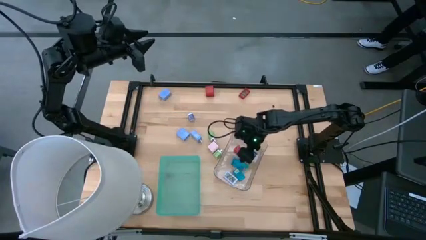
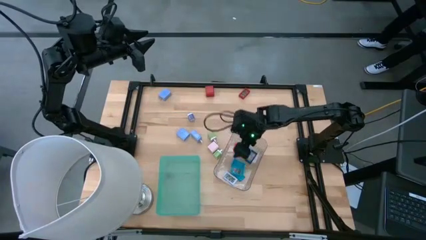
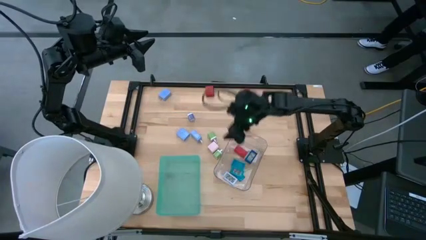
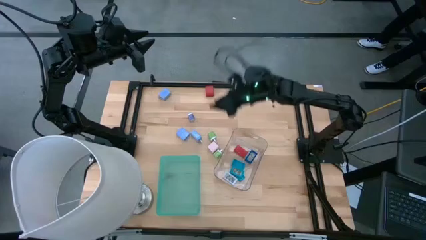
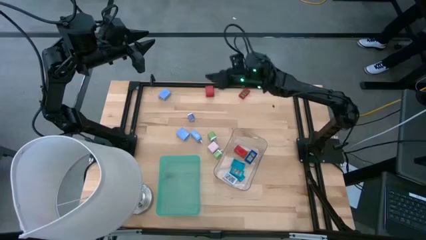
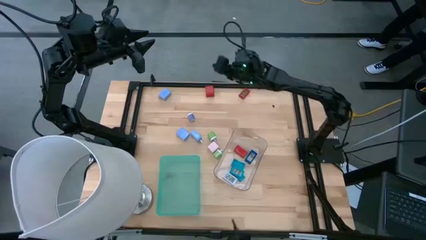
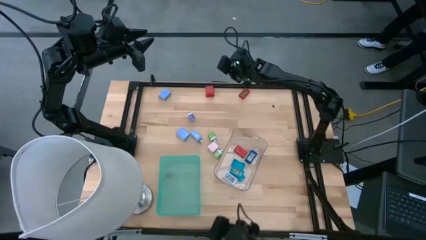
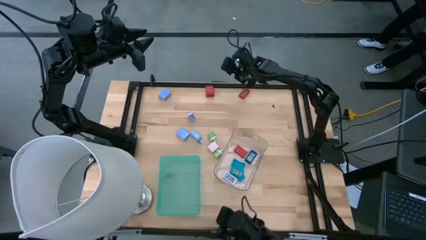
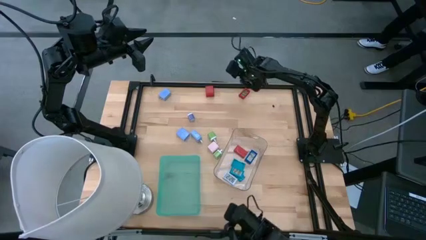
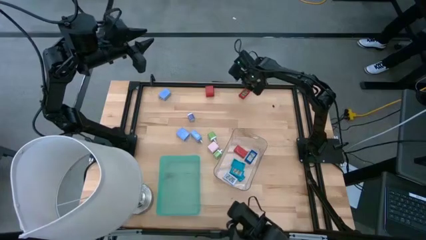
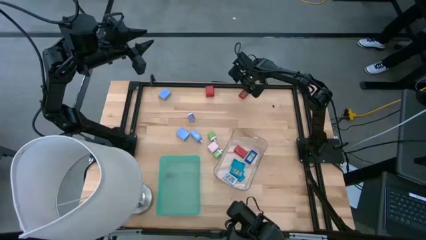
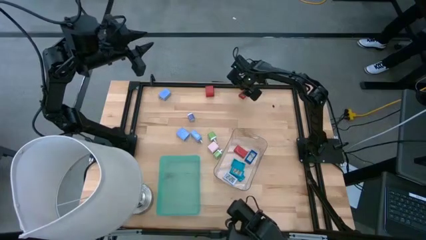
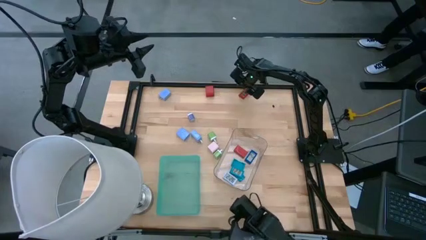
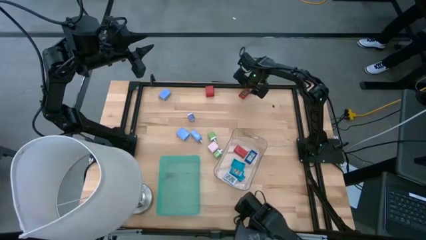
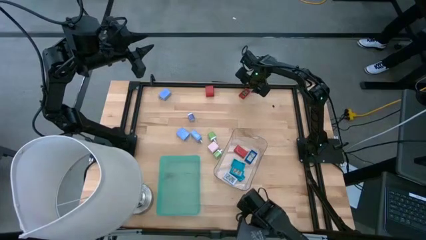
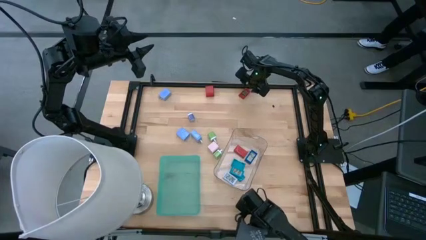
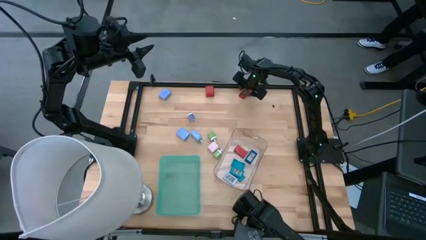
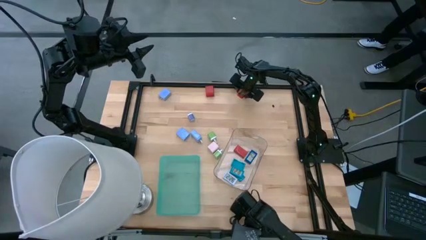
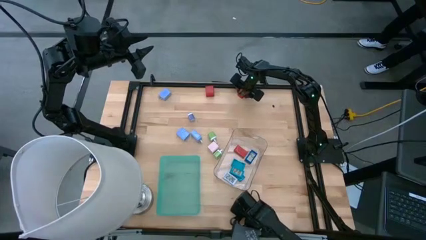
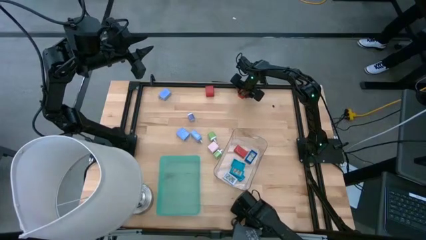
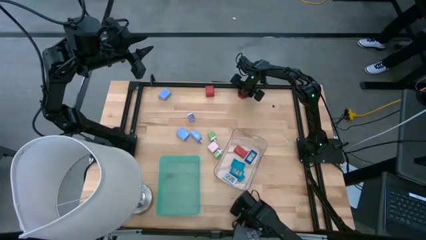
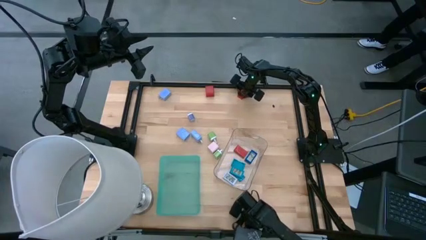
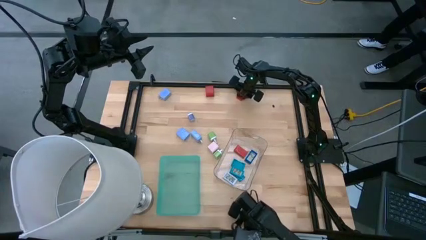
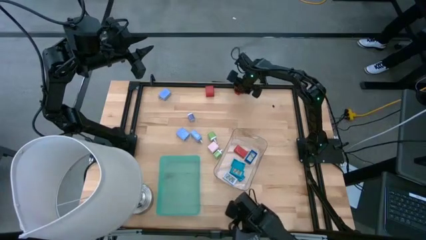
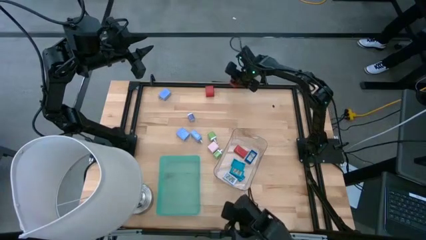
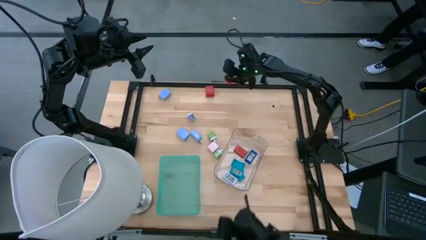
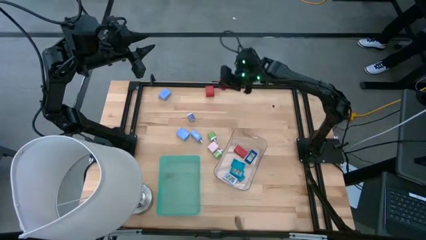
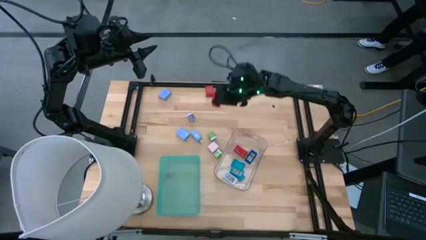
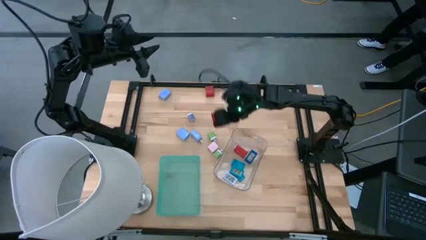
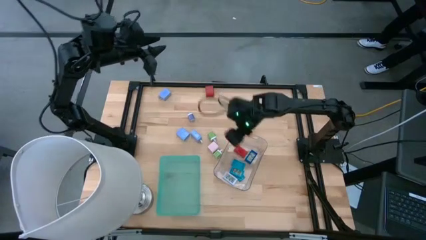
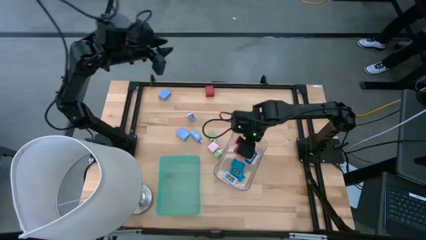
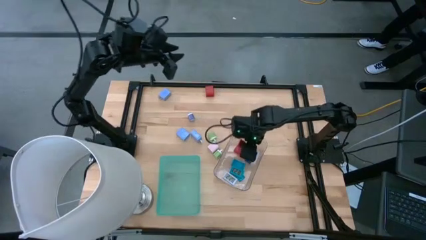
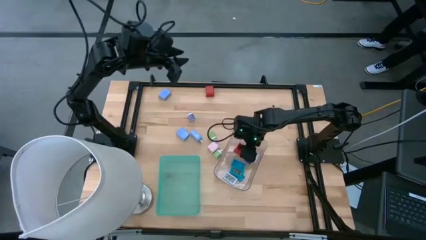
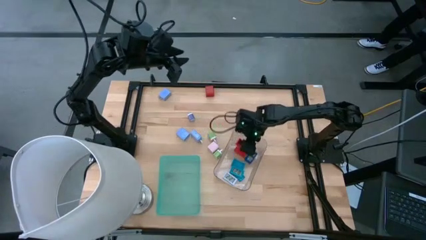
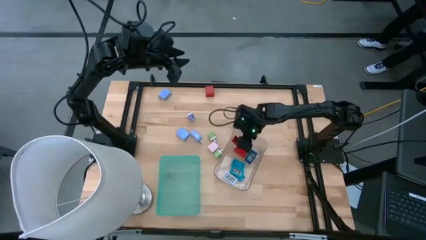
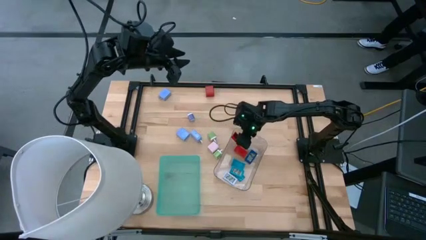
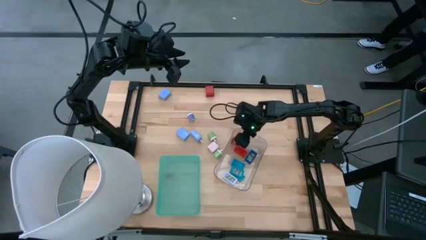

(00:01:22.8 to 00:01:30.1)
Task: Pick & Place Office items
Put the red digital clock into the transparent bin

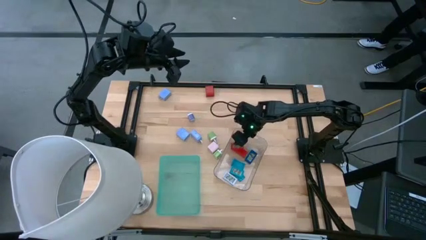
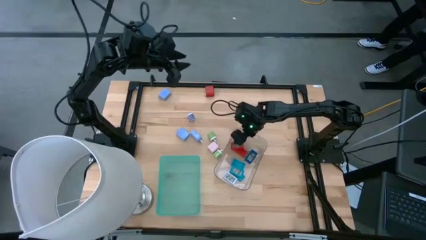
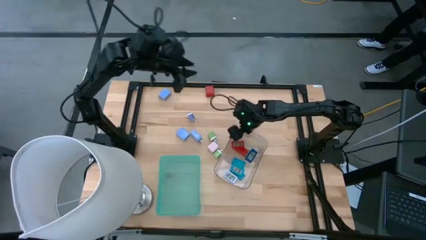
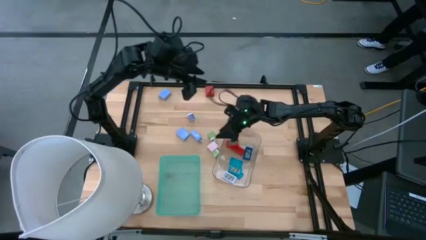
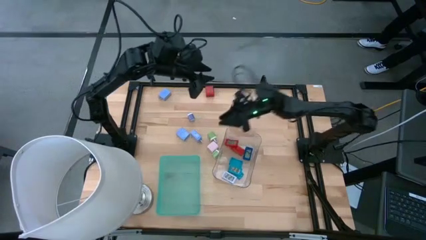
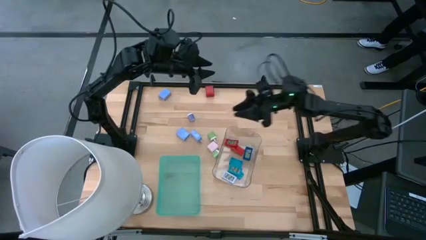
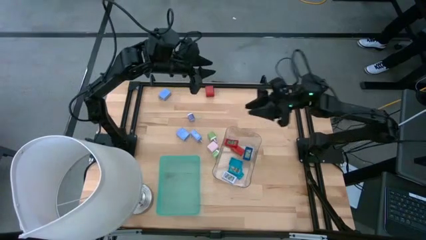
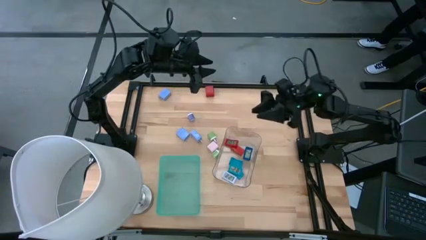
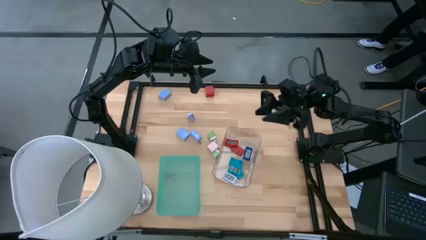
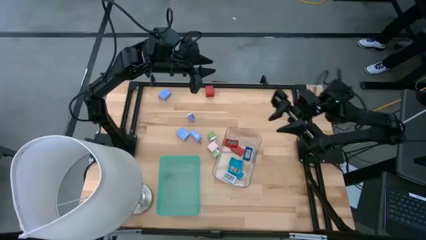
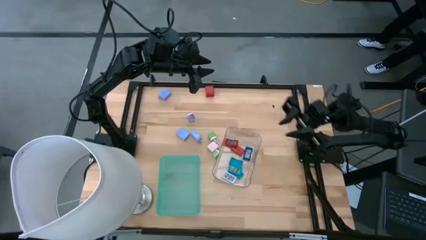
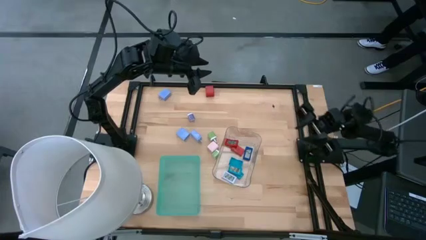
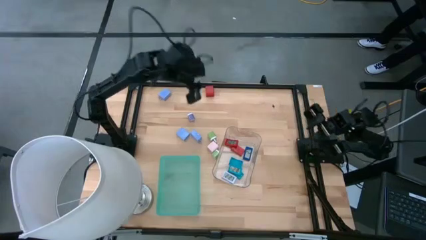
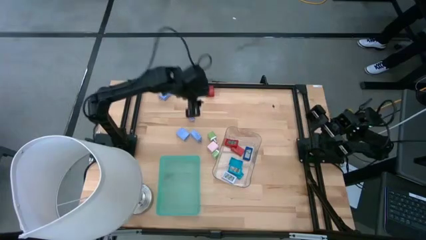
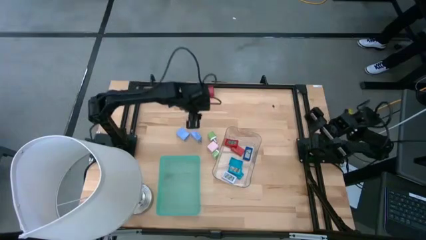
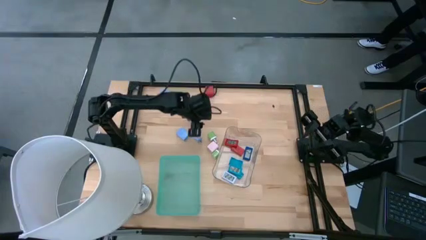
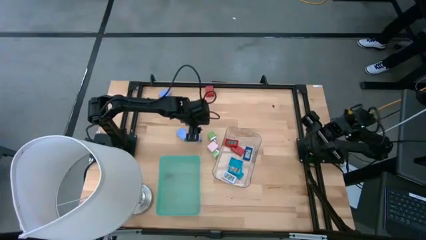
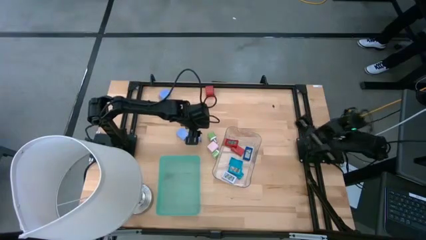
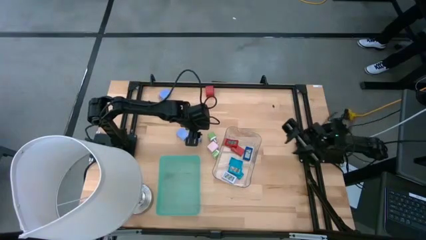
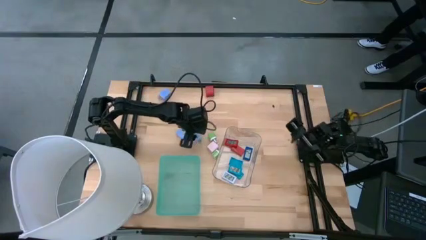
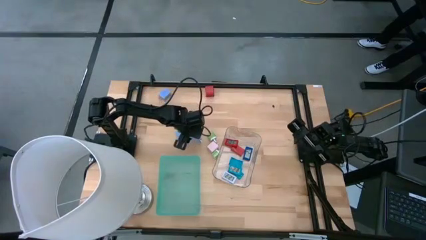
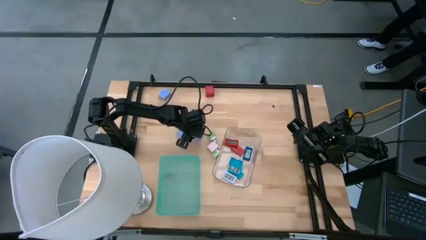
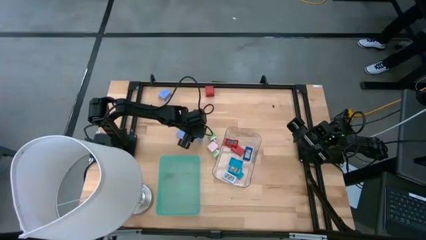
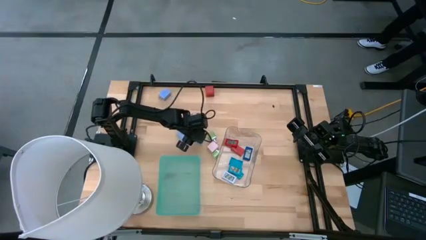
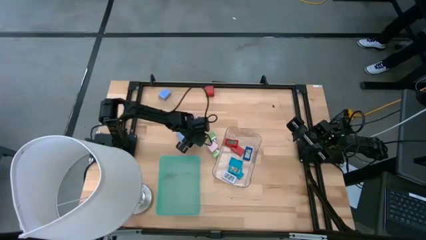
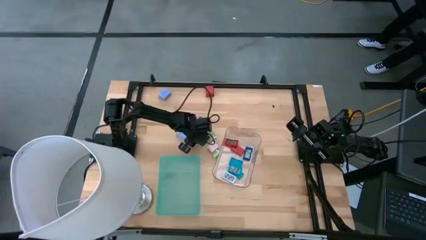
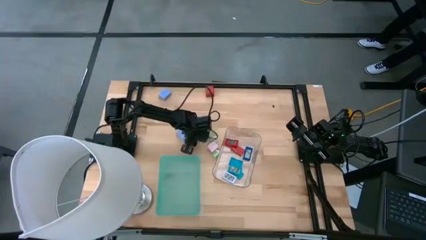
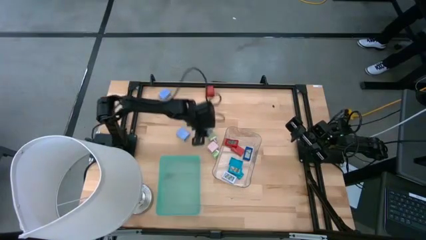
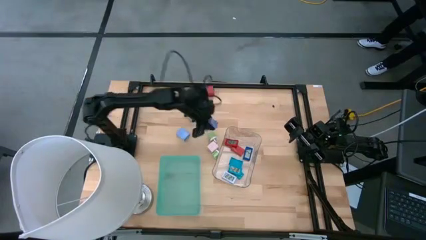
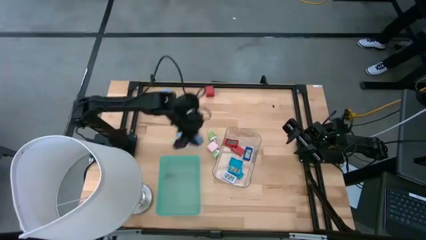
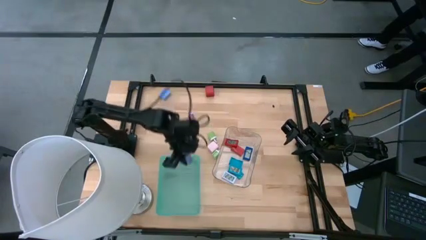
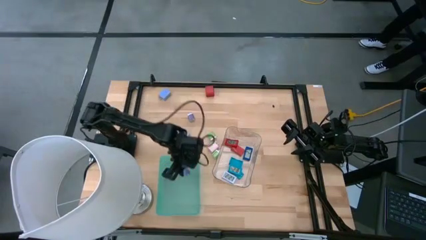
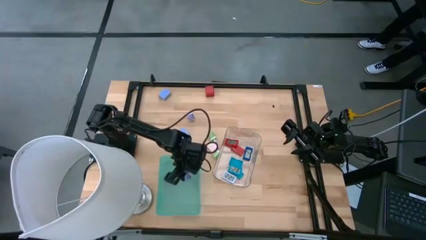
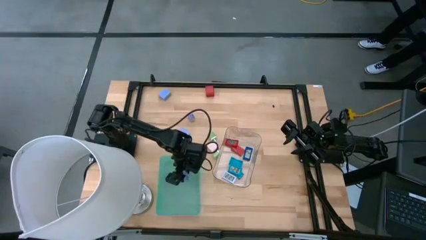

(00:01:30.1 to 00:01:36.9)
Put the bottom right blue charger adapter into the green bin

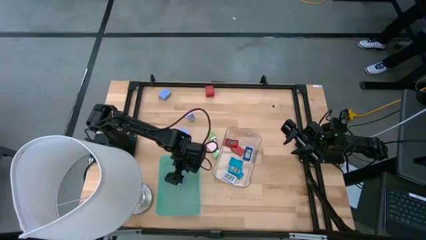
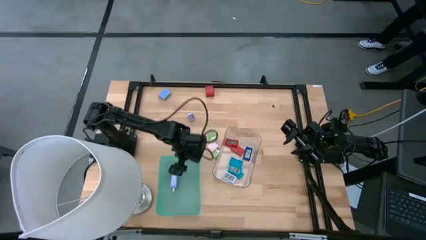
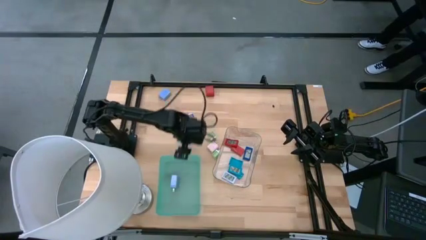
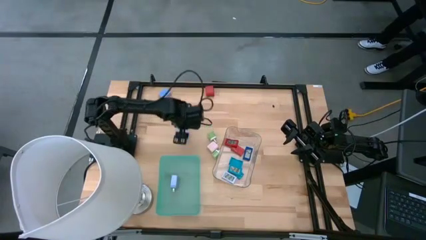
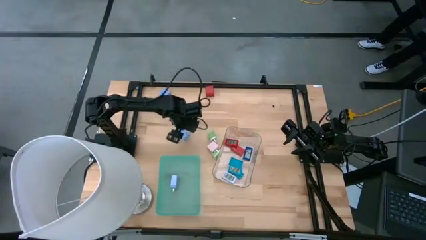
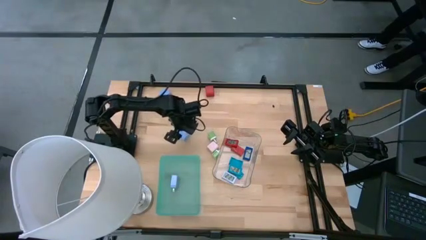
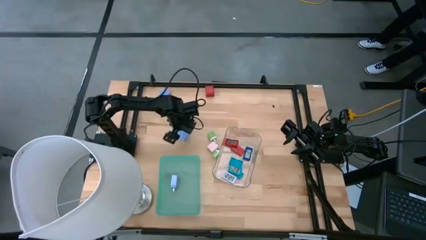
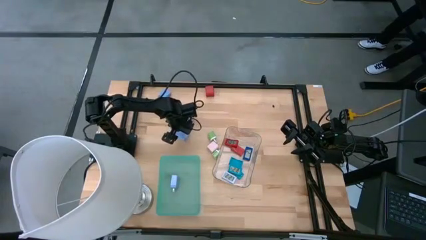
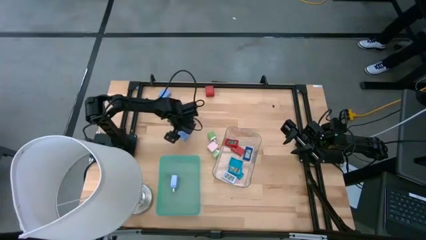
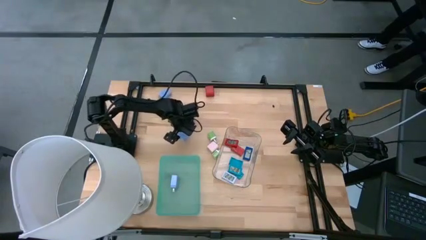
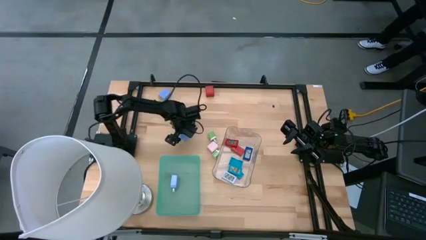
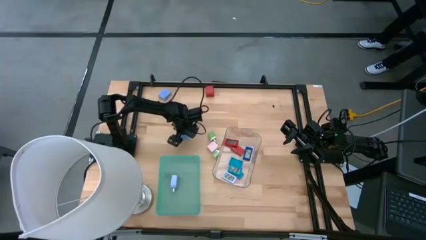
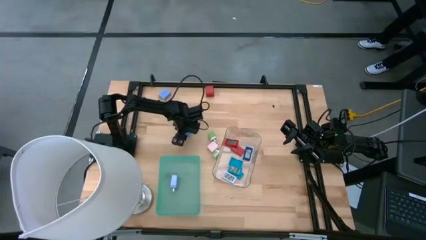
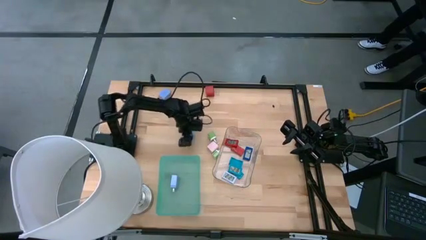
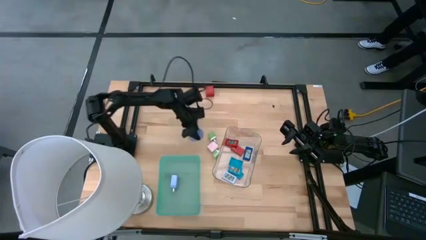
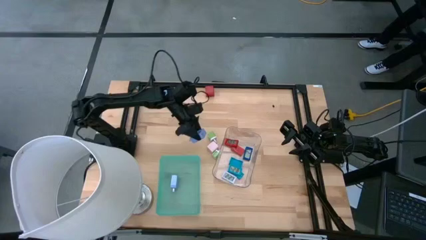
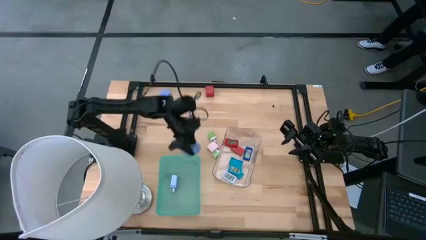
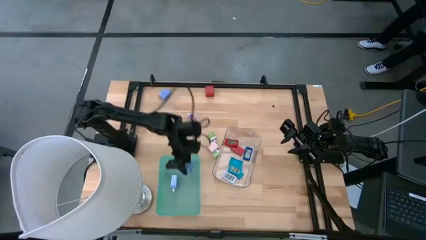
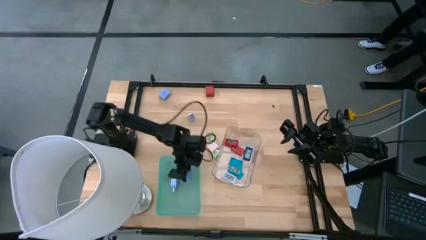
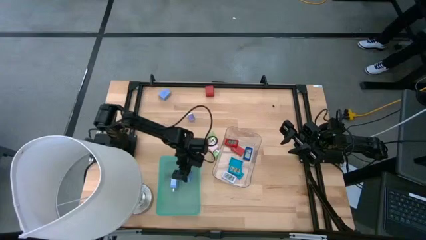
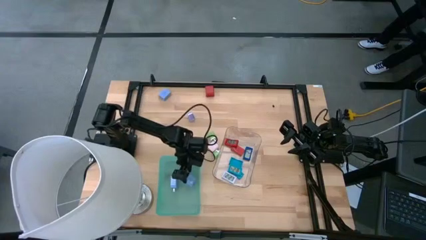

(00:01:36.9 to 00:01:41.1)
Put the bottom blue charger adapter into the green bin
